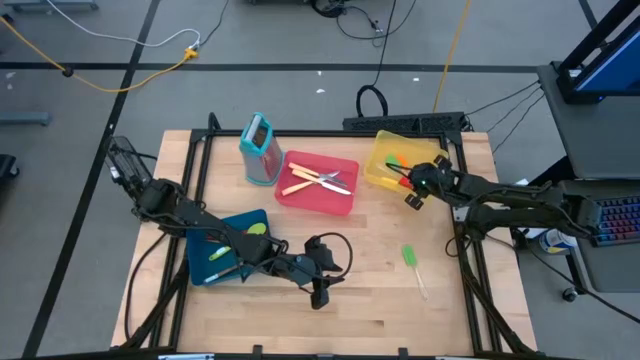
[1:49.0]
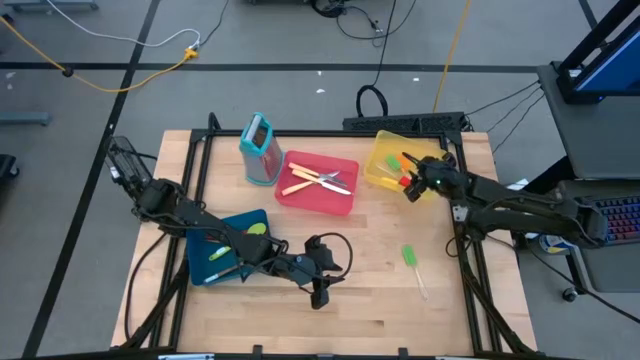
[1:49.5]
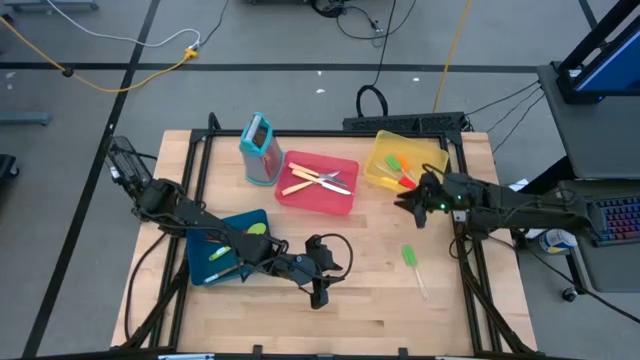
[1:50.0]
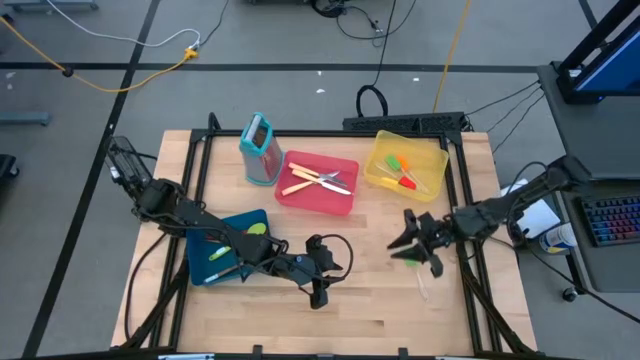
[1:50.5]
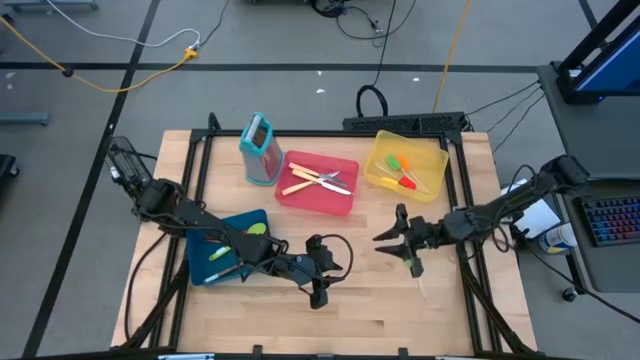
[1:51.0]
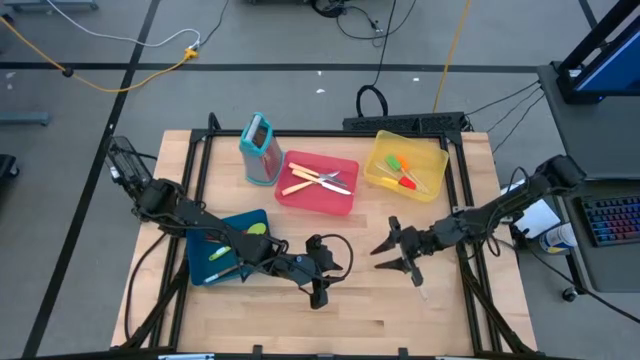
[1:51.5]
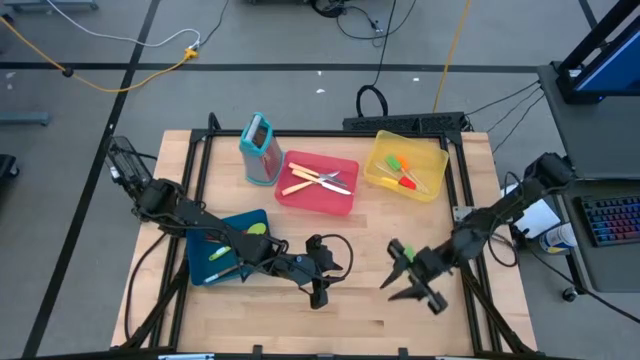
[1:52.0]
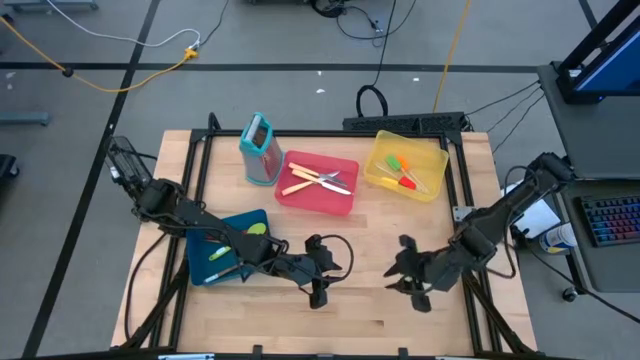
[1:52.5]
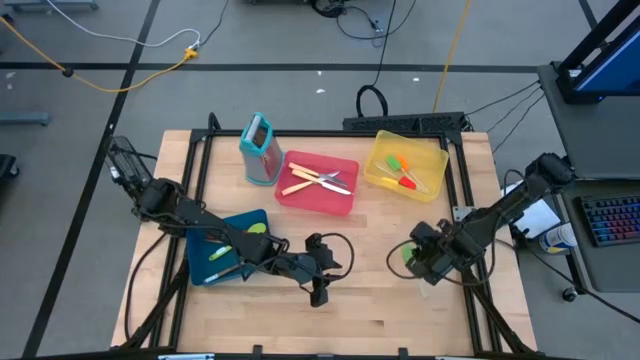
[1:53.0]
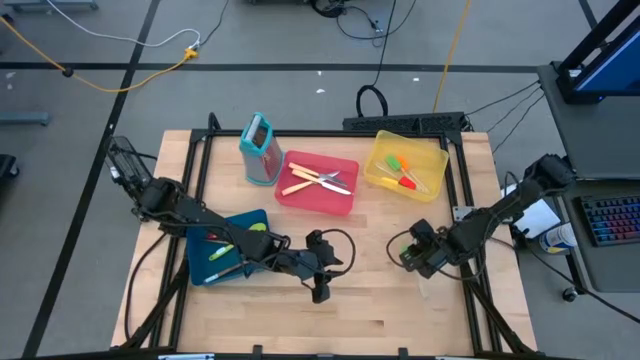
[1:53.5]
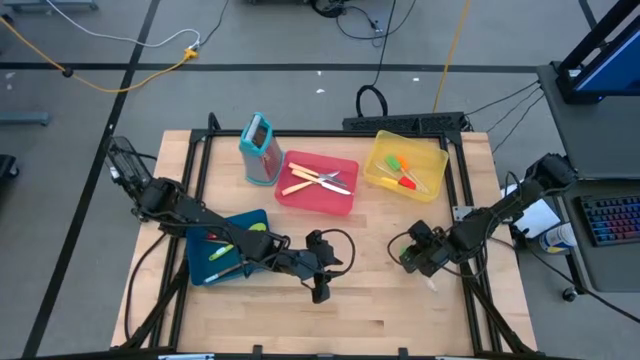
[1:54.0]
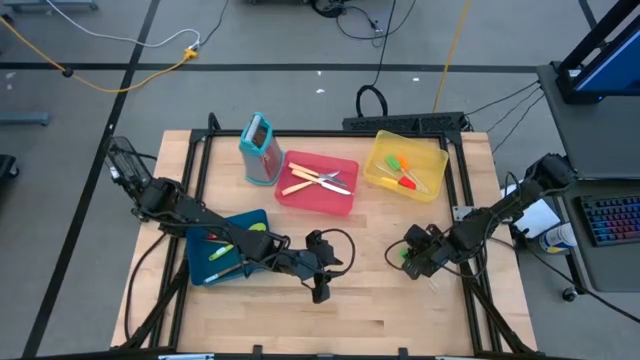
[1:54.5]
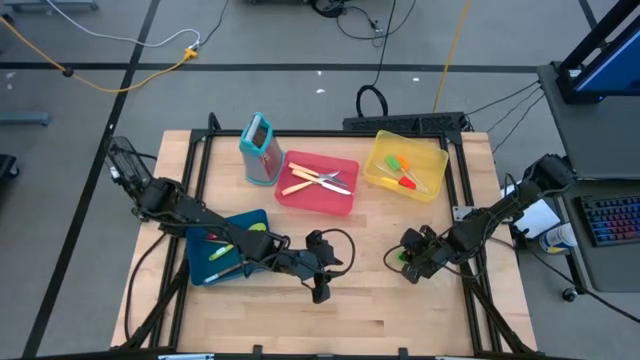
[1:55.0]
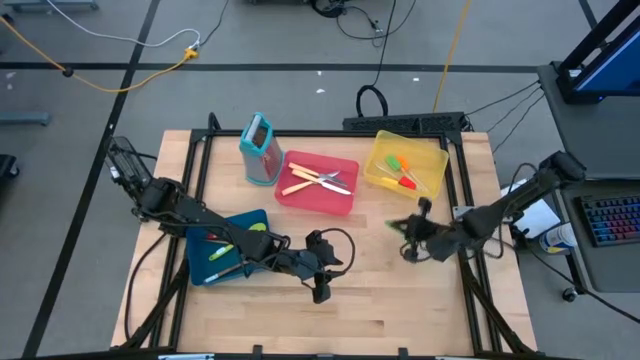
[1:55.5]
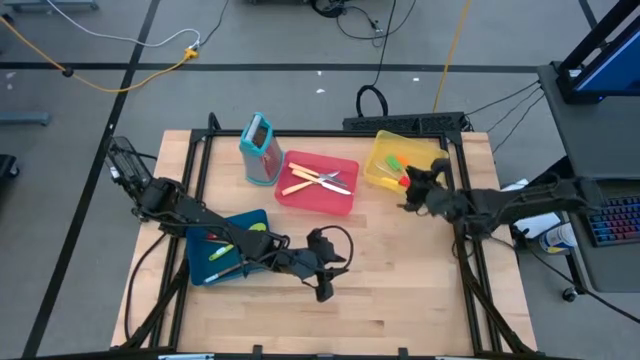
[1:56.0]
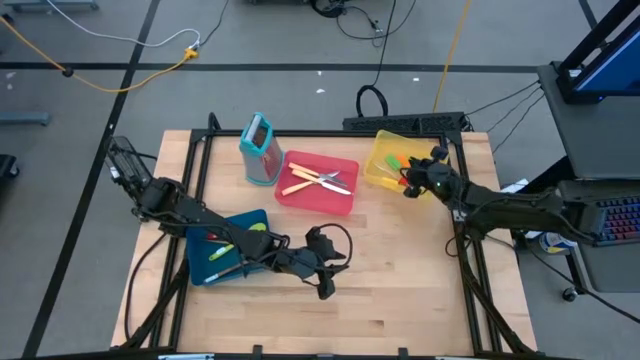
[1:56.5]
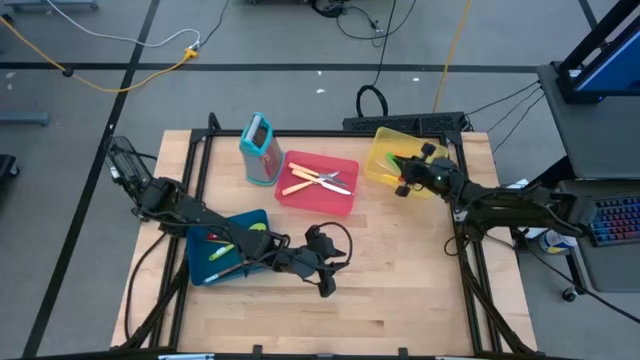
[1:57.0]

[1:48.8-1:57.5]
Task: Pick & Place Kitchen Items
Put the green spatula into the yellow bin

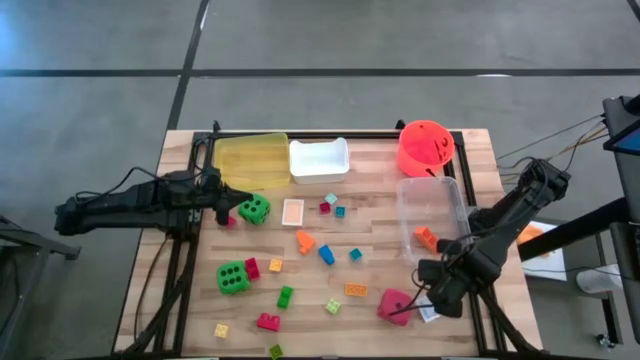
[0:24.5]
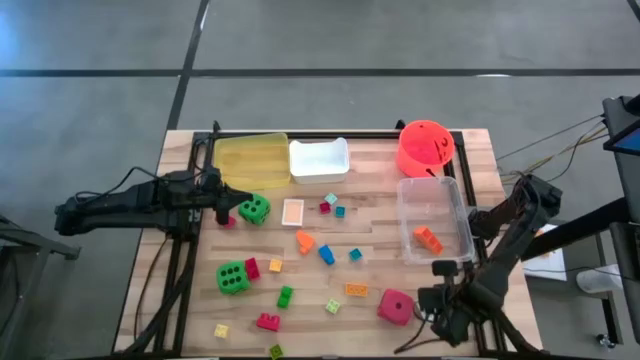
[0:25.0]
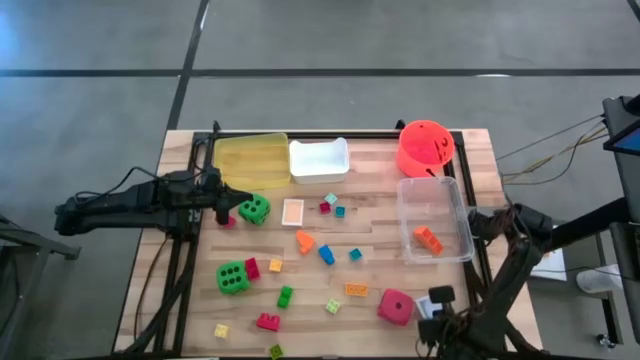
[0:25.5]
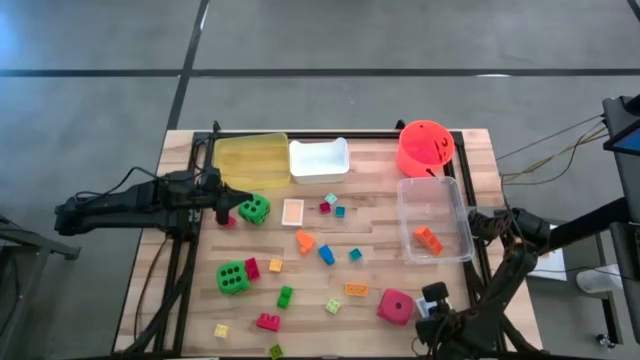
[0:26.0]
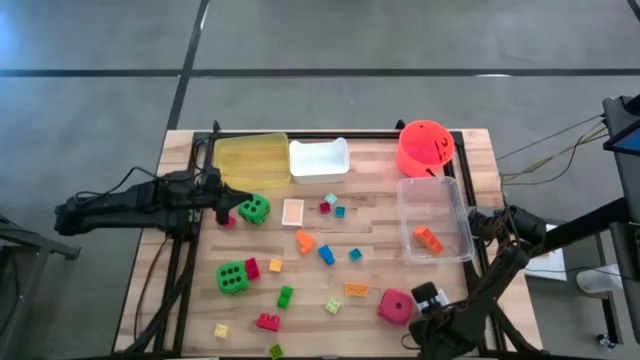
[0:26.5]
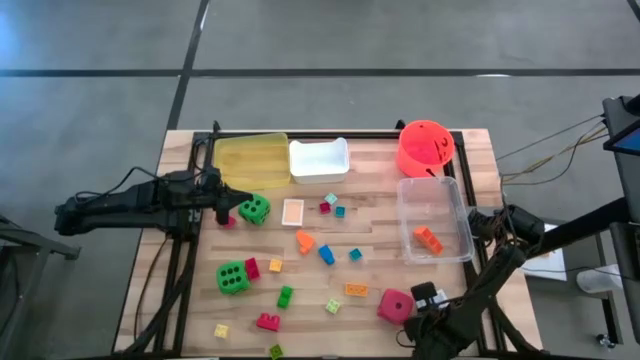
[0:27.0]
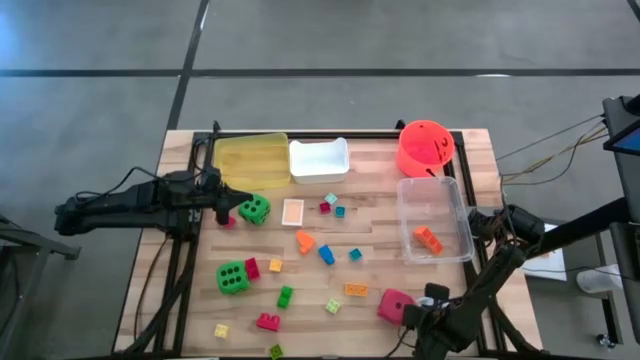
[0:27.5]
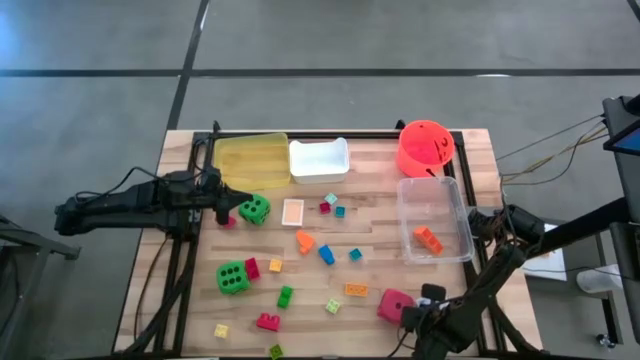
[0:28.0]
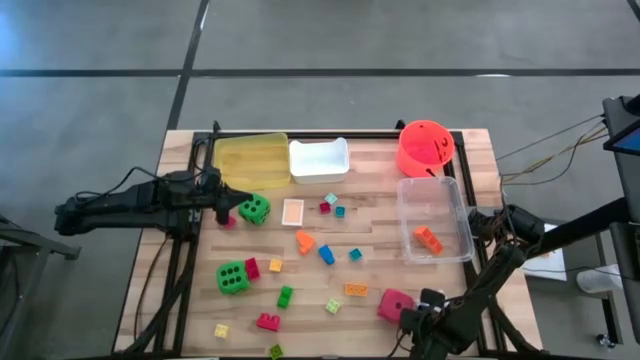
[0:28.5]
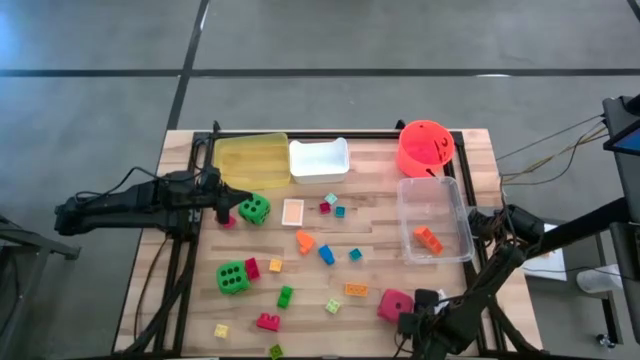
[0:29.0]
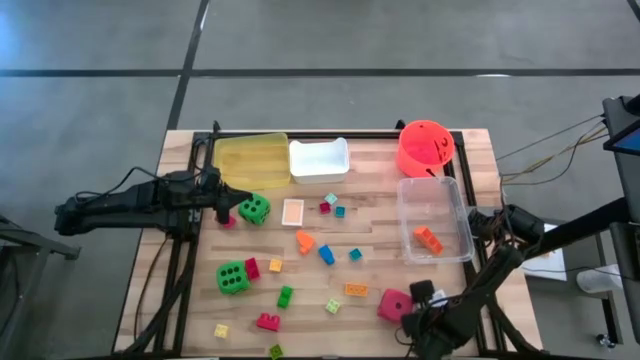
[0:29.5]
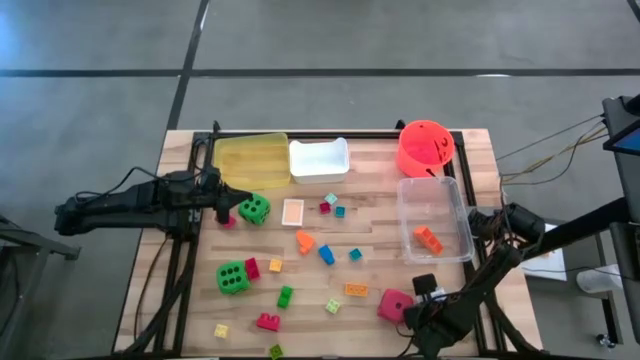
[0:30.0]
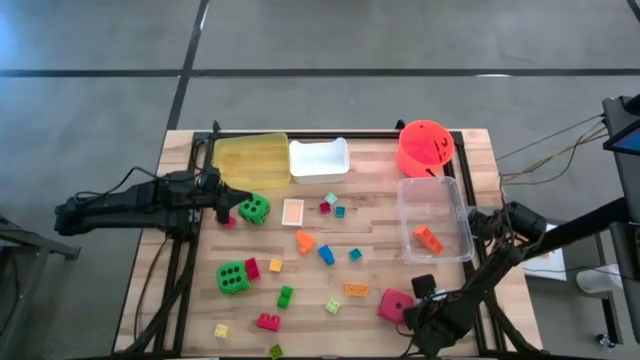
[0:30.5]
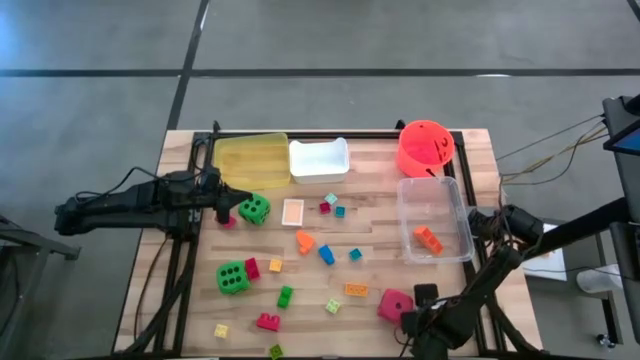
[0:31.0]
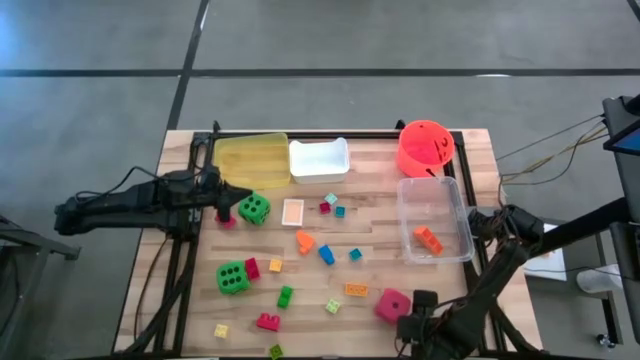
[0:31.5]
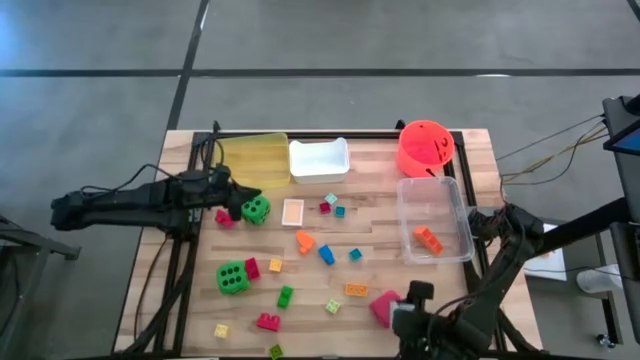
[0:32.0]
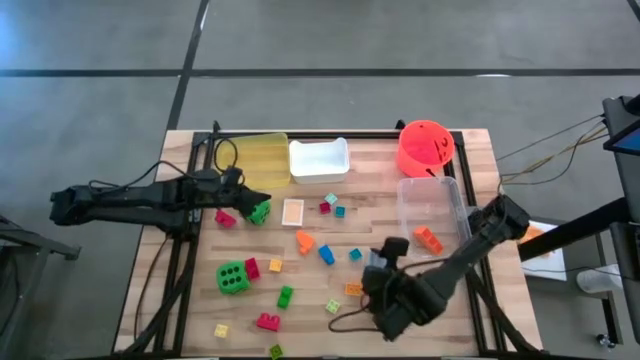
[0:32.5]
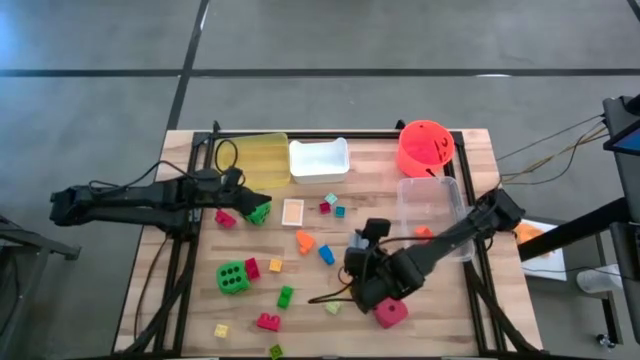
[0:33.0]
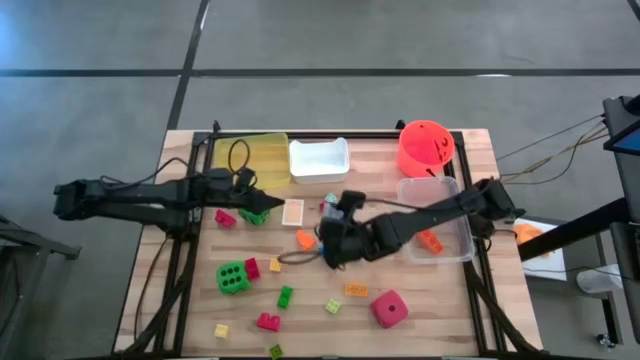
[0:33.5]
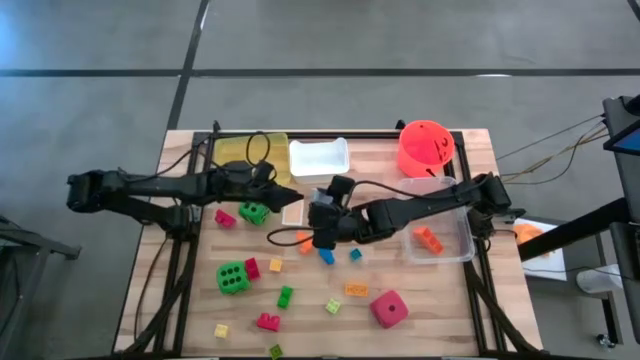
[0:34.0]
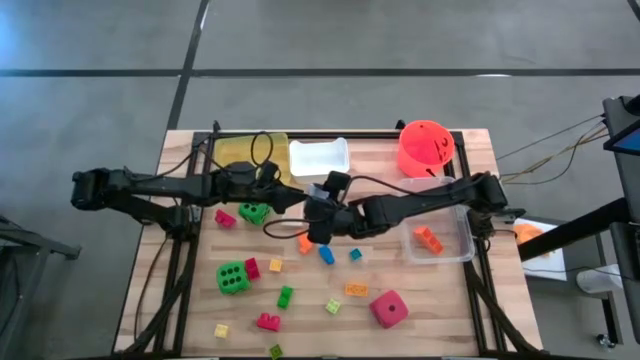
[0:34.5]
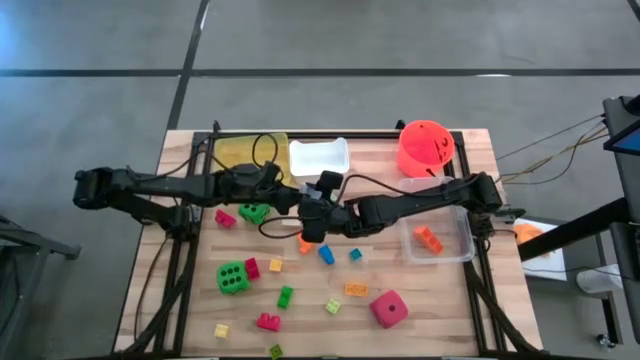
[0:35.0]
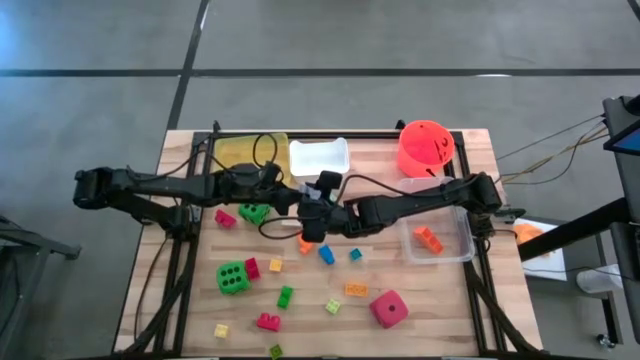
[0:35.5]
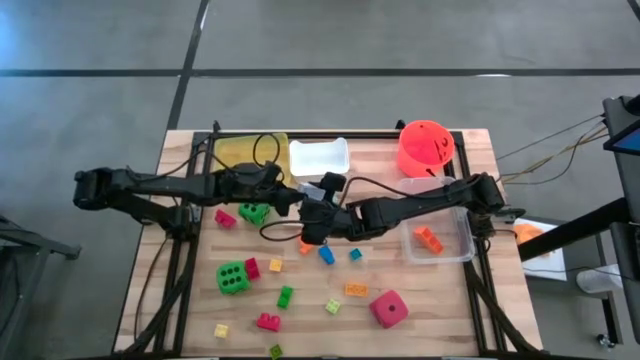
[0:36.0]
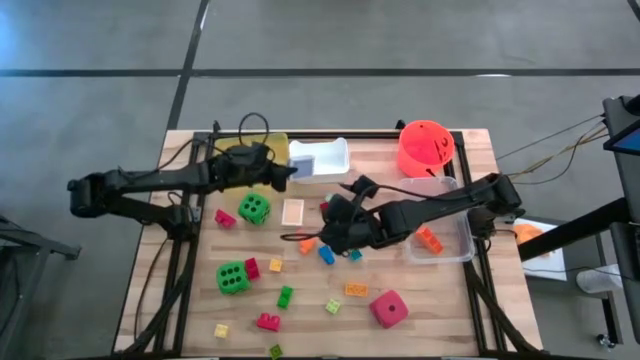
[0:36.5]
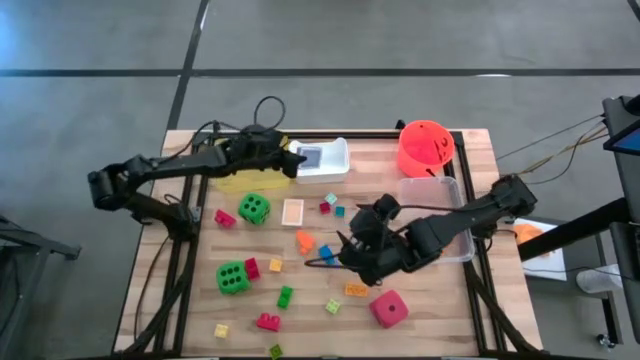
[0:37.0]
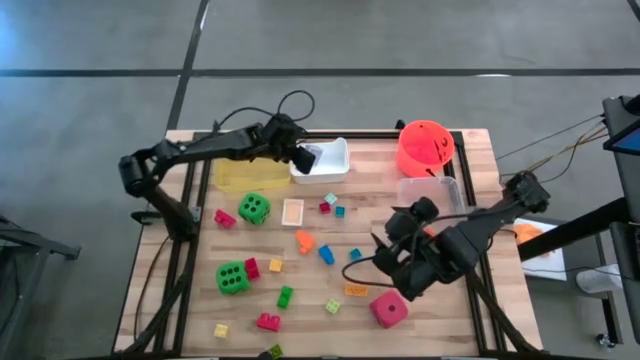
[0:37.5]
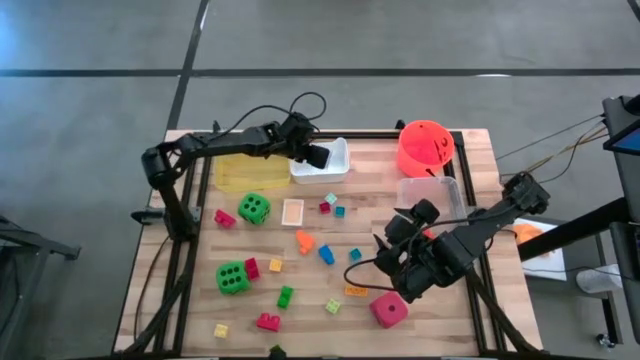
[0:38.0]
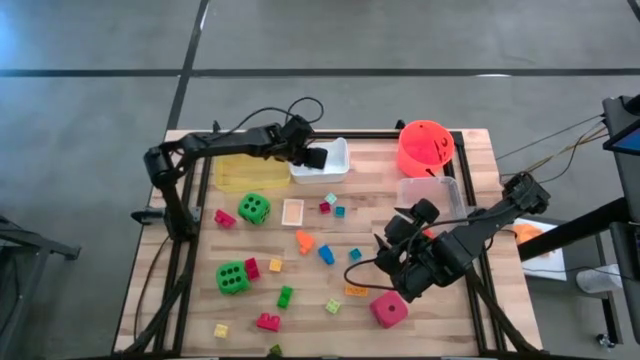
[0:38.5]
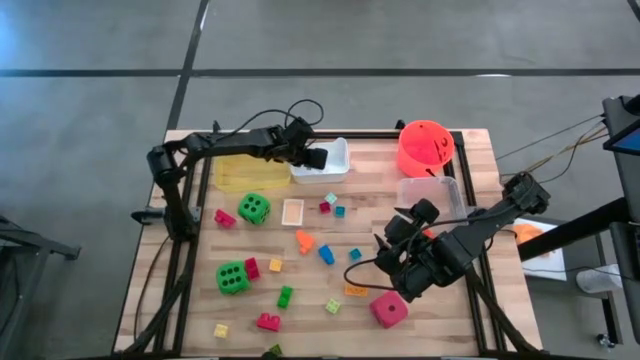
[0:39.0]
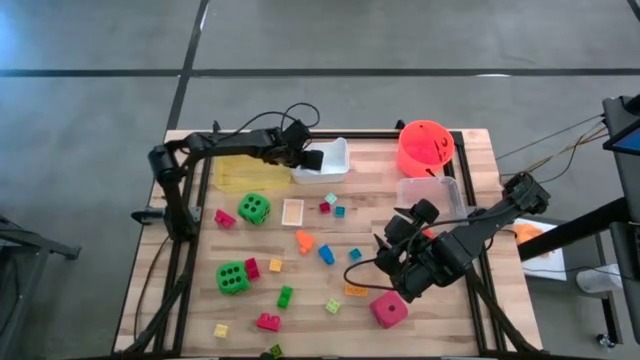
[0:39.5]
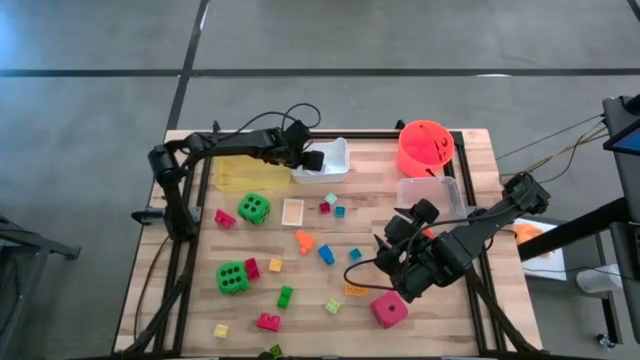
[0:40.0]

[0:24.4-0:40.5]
Task: Pick & Place Toys
Put the blue deck of cards into the white bin
